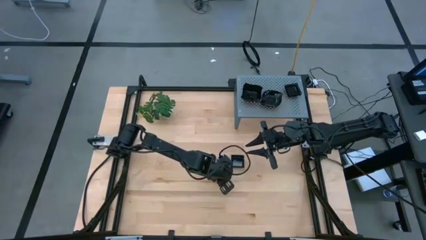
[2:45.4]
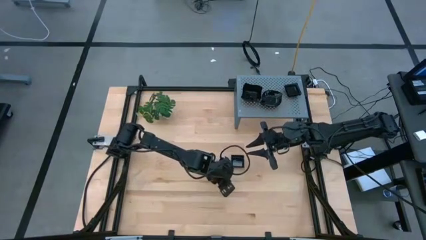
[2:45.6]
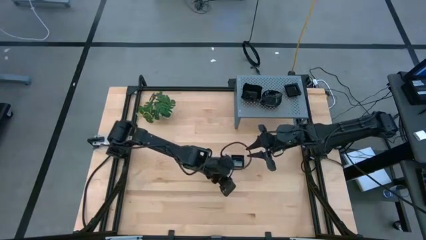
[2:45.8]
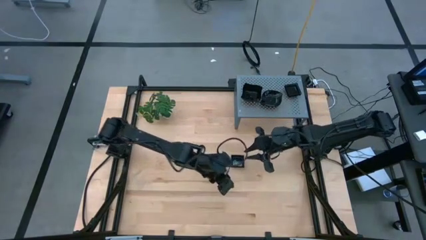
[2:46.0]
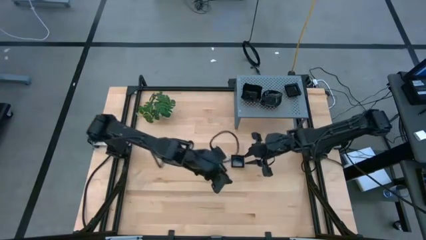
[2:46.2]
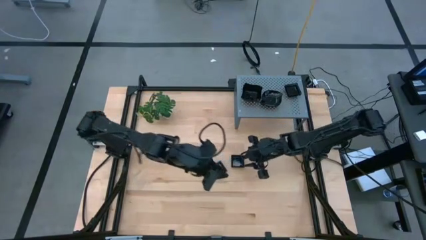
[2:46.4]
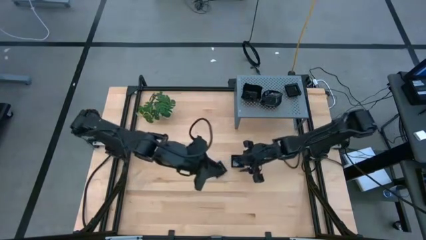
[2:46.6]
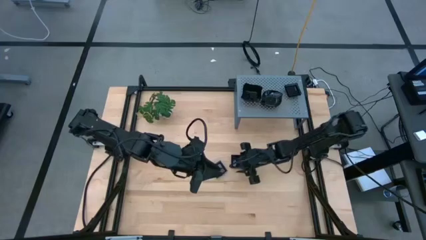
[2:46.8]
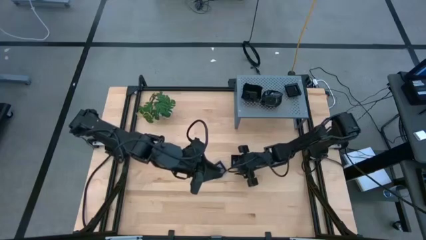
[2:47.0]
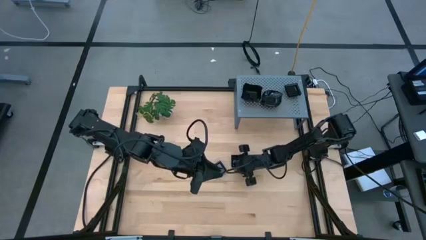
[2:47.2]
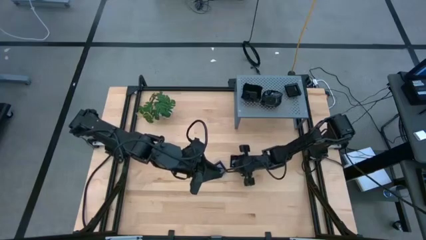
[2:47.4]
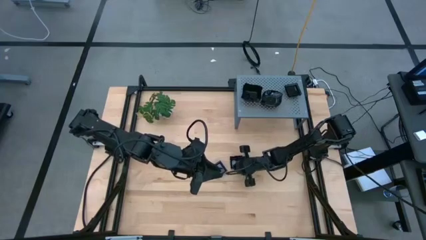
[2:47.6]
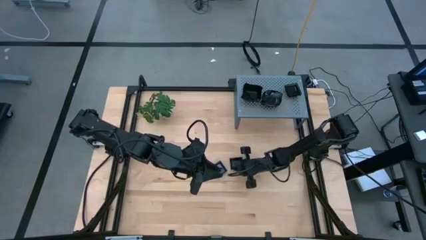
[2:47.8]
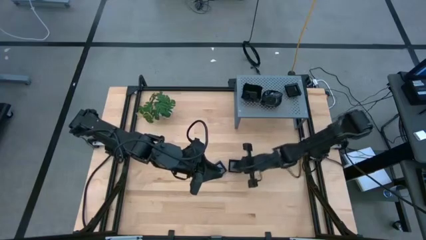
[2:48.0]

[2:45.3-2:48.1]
Task: Pick & Place Mini shaped plates
Stack the square plate on top of the square plates on the shelf

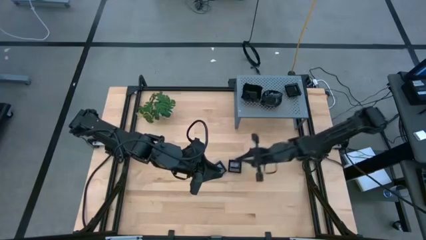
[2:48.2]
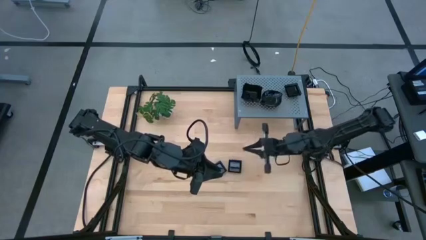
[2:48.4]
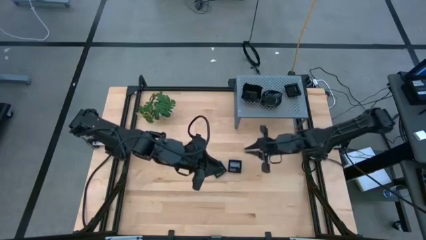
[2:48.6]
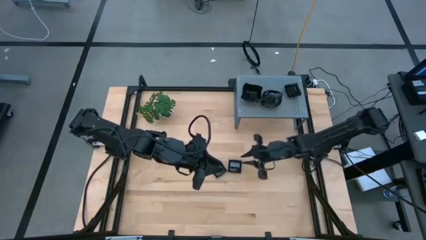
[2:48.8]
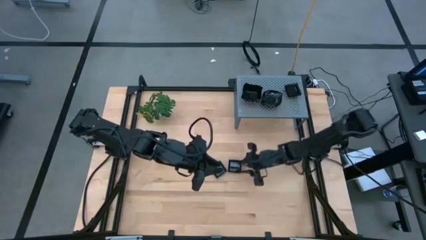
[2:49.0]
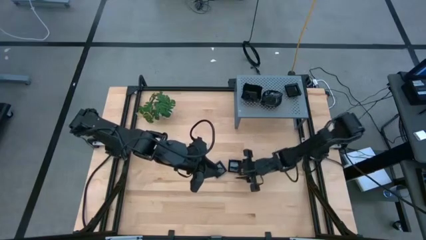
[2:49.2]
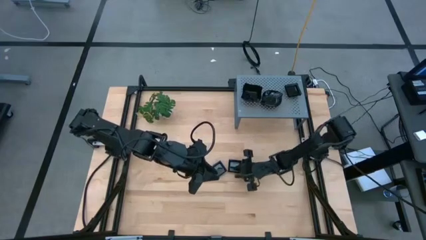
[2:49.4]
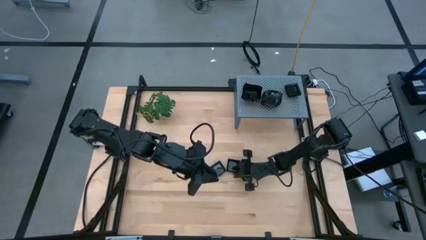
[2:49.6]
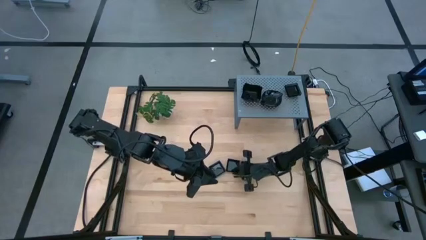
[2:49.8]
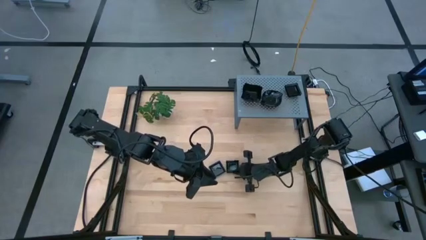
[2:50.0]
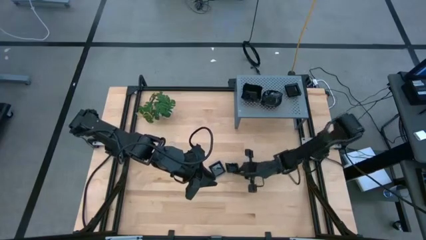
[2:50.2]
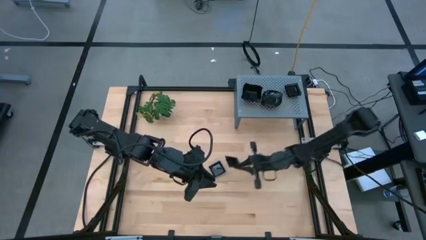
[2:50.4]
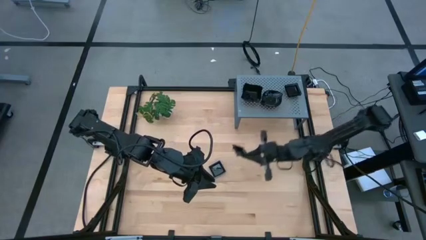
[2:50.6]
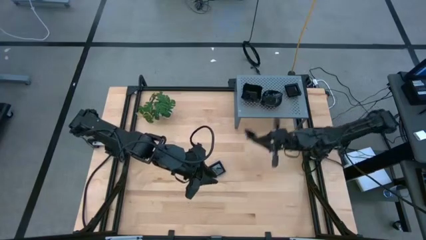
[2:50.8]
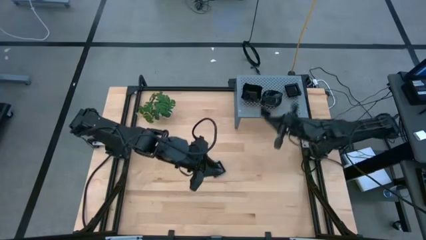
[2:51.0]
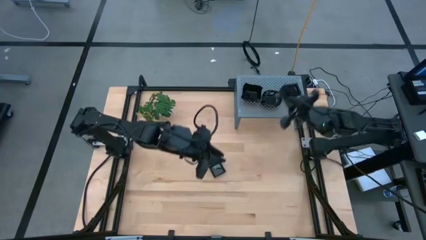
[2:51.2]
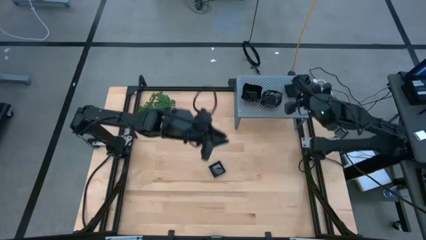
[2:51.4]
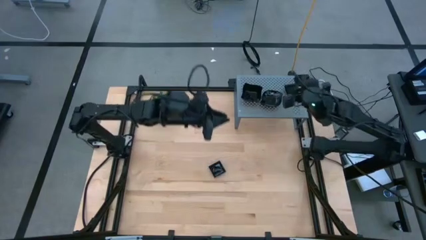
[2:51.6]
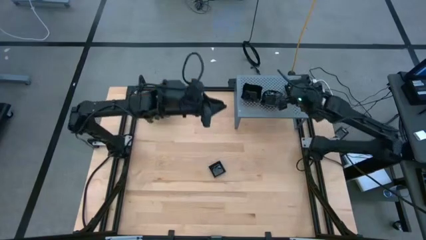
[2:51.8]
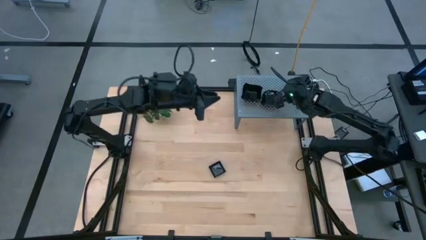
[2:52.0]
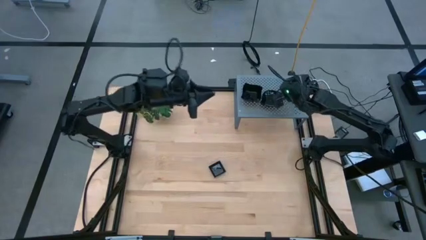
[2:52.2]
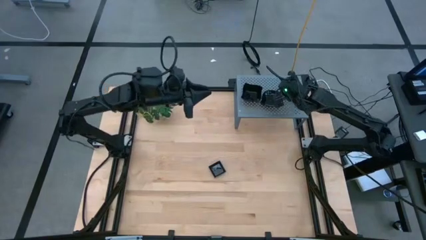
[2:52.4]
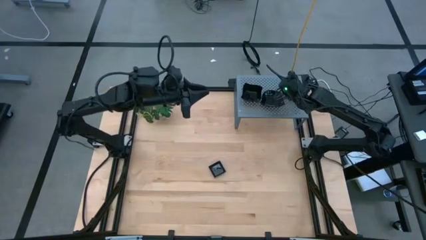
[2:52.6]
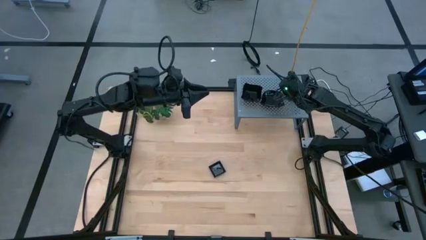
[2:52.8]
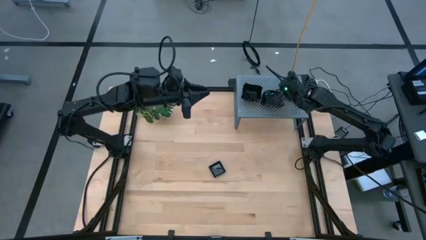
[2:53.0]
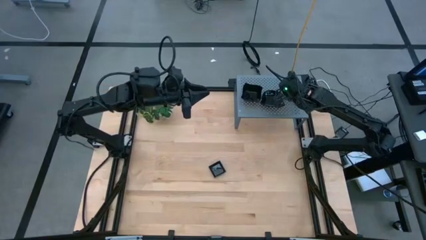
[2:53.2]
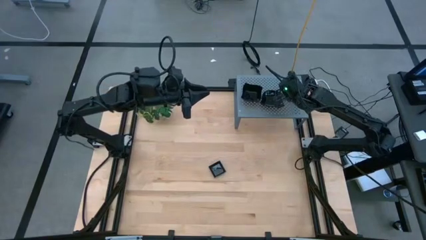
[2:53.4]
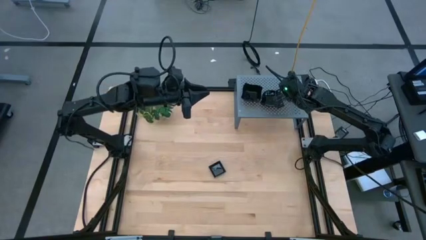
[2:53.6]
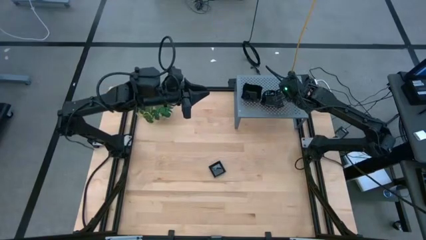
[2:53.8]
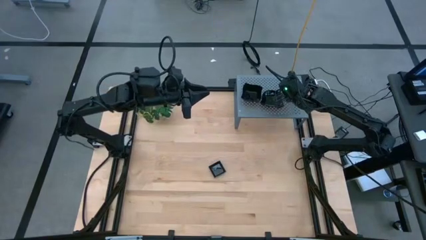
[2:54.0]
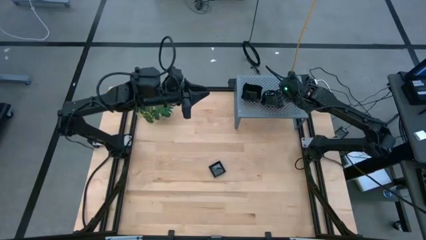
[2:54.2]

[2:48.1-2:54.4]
Stack the square plate on top of the square plates on the shelf

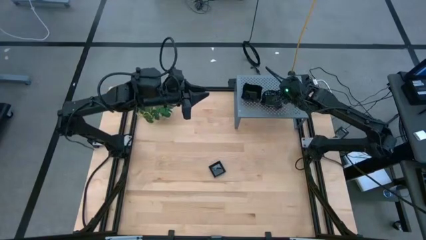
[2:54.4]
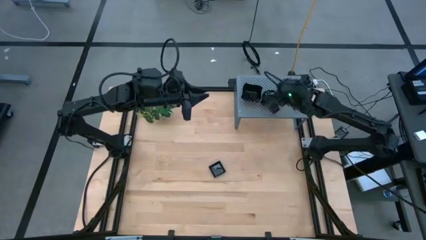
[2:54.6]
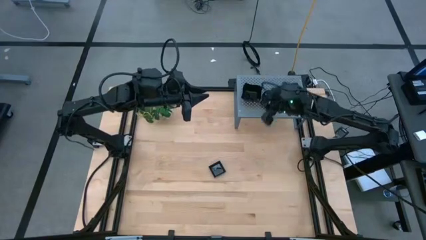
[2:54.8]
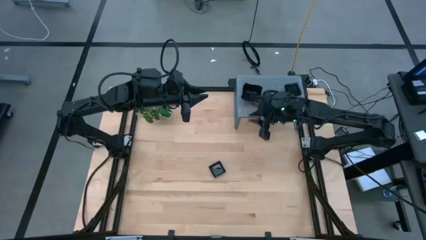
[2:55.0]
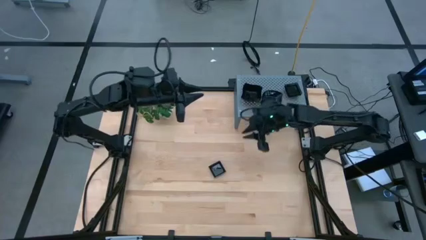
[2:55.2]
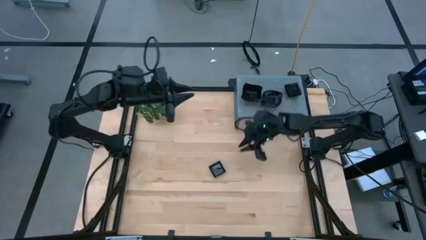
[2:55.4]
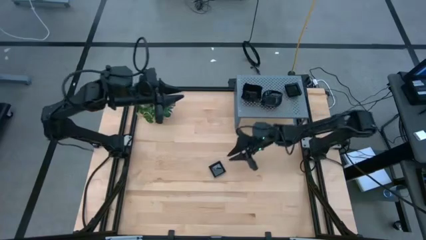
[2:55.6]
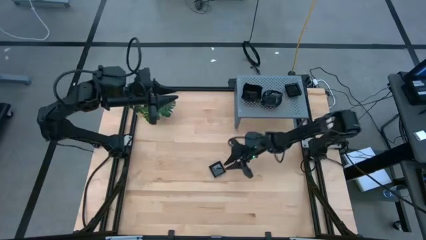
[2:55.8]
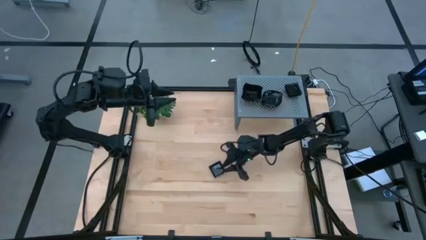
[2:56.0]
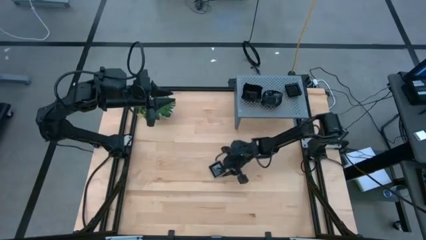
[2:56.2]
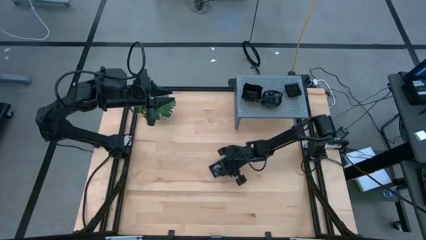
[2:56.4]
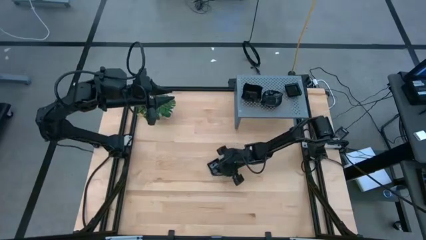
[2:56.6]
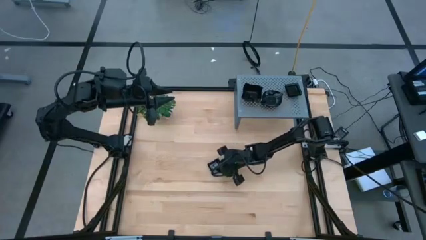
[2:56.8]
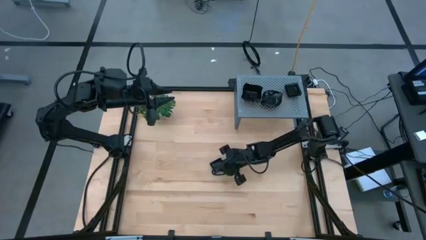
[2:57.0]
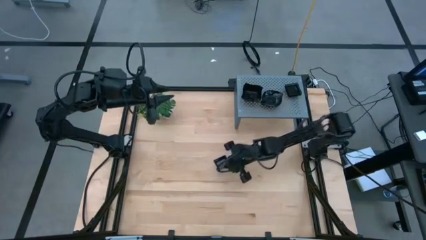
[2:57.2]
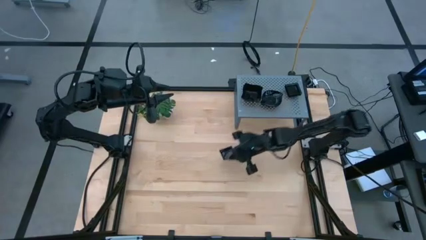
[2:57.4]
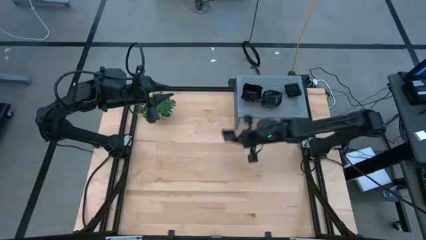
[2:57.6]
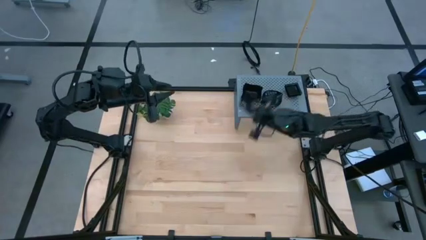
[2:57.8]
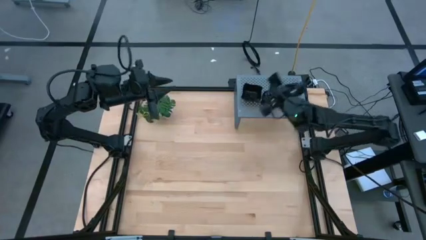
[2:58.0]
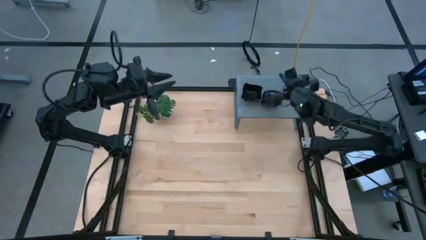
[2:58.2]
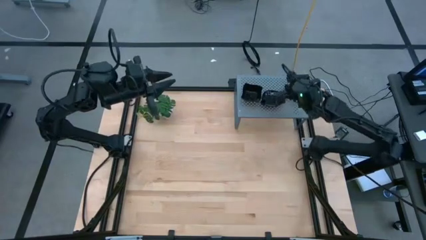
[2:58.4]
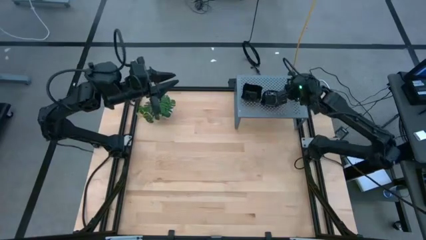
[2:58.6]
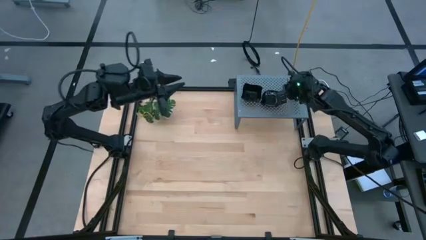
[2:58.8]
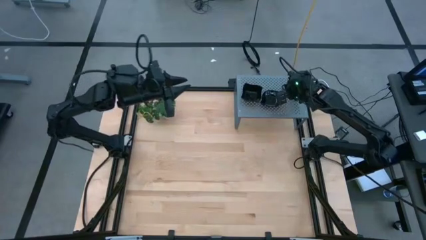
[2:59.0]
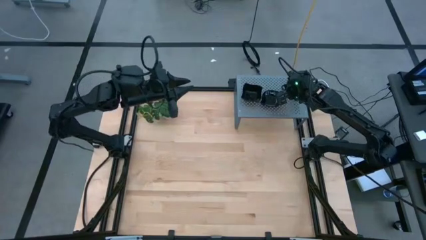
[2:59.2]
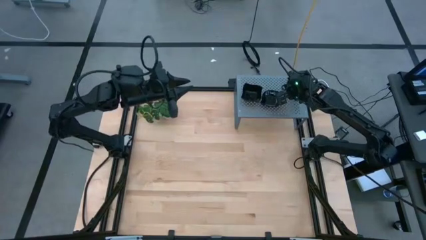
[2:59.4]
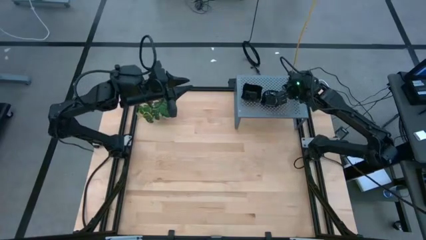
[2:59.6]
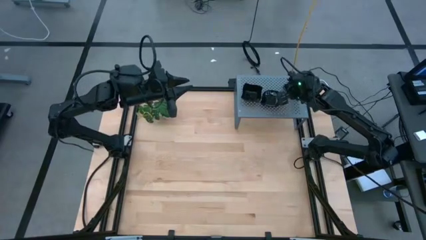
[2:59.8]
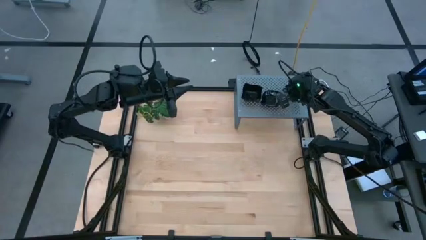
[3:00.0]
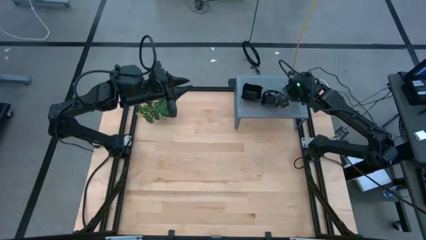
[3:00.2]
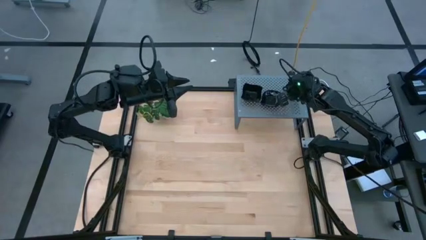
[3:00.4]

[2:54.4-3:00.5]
Stack the square plate on top of the square plates on the shelf
